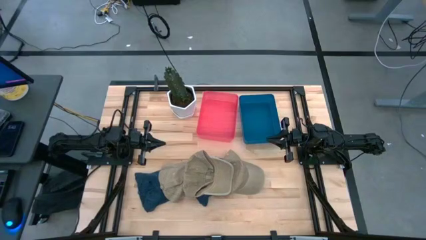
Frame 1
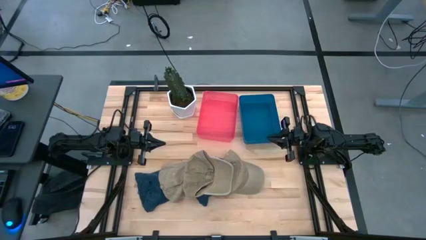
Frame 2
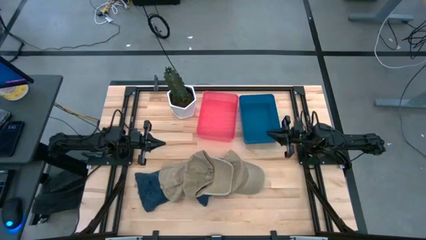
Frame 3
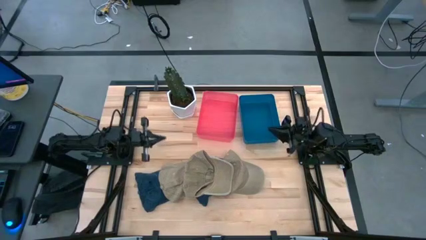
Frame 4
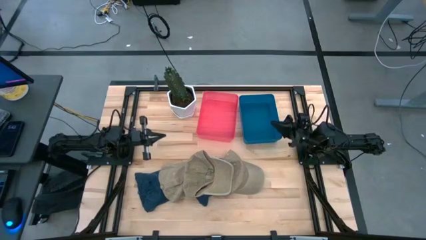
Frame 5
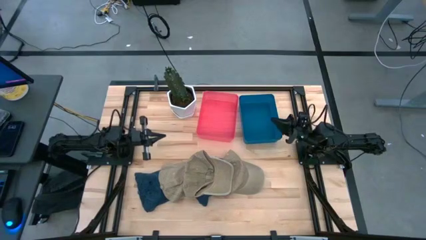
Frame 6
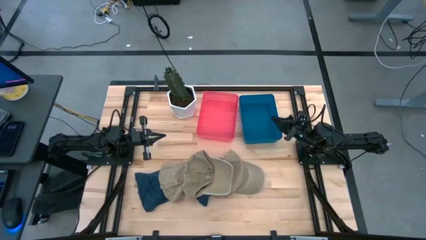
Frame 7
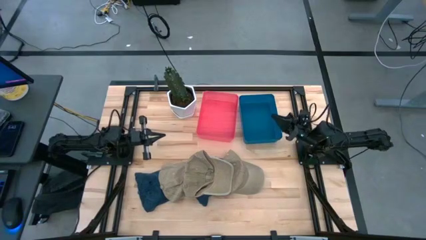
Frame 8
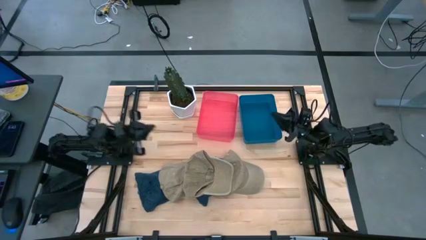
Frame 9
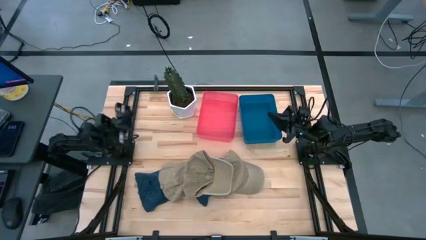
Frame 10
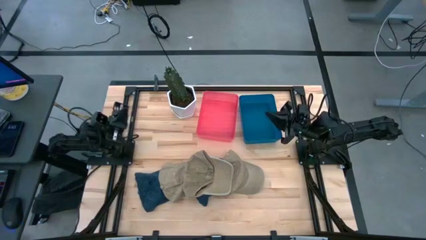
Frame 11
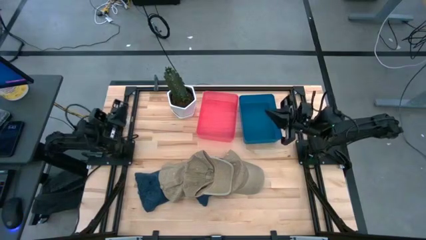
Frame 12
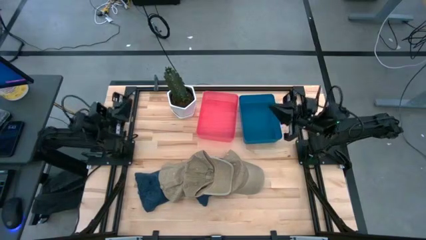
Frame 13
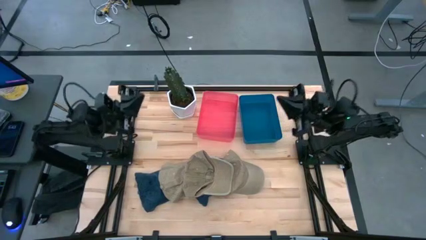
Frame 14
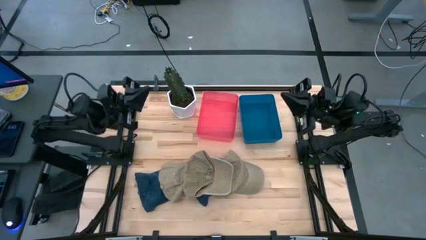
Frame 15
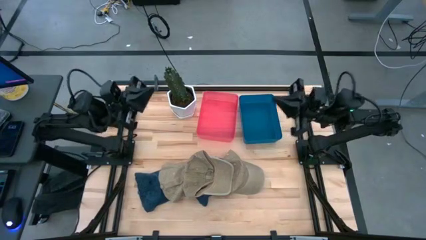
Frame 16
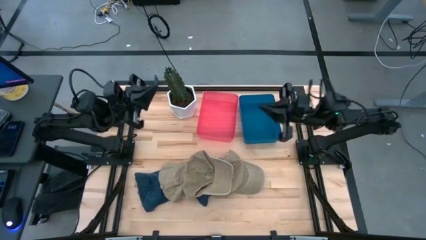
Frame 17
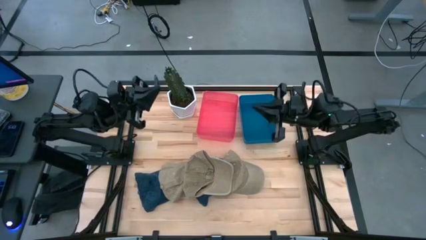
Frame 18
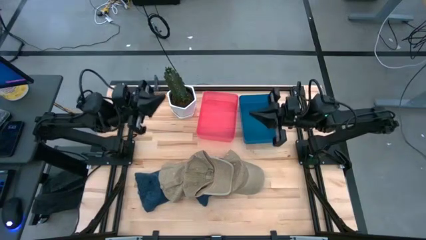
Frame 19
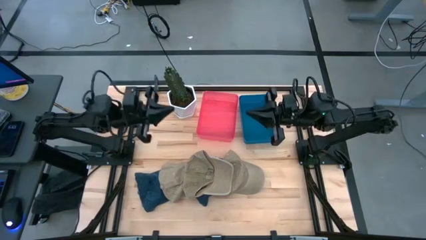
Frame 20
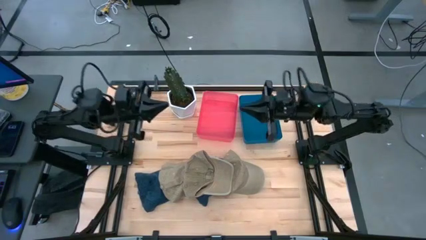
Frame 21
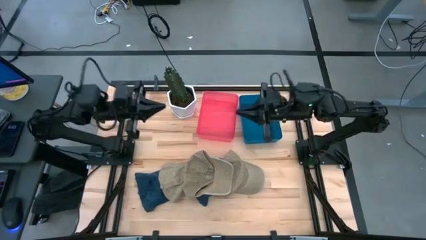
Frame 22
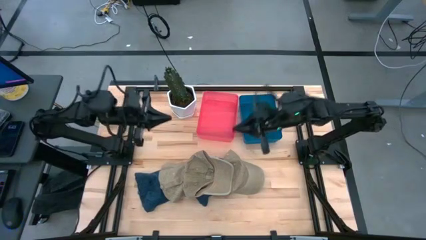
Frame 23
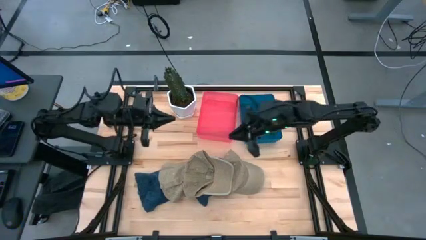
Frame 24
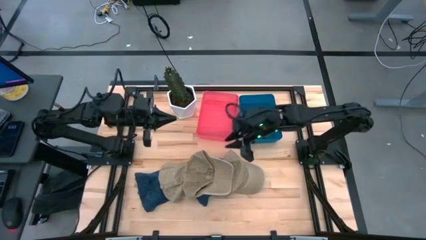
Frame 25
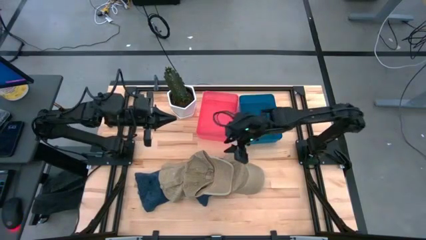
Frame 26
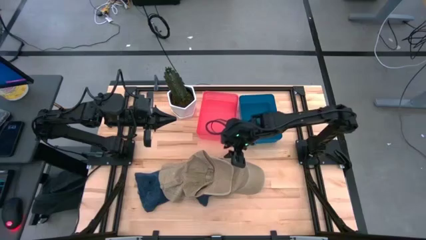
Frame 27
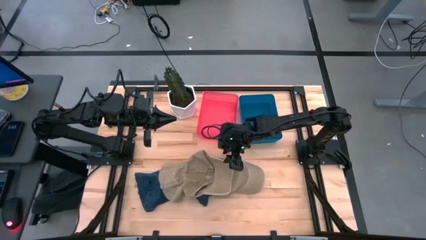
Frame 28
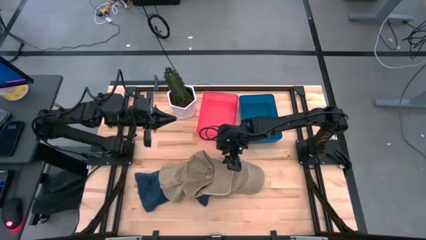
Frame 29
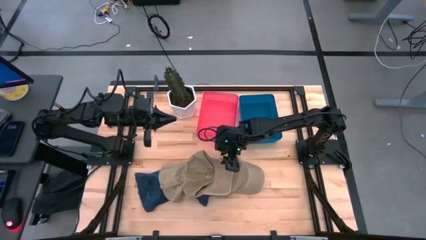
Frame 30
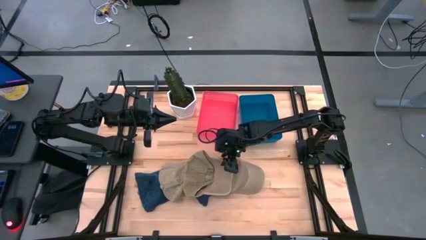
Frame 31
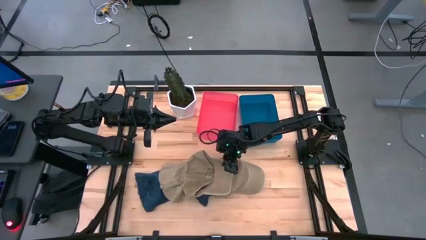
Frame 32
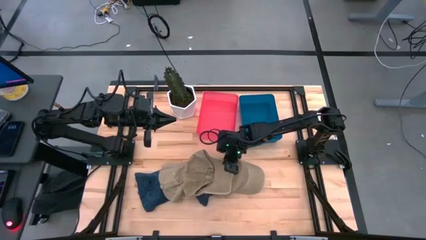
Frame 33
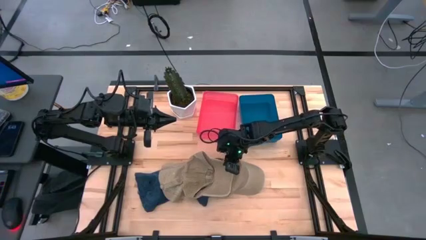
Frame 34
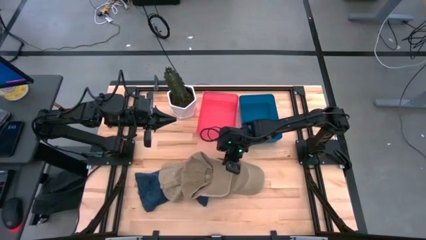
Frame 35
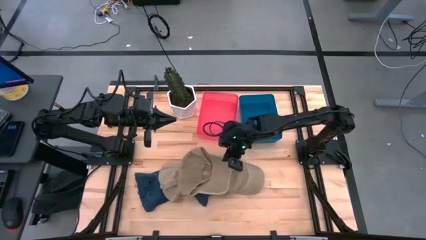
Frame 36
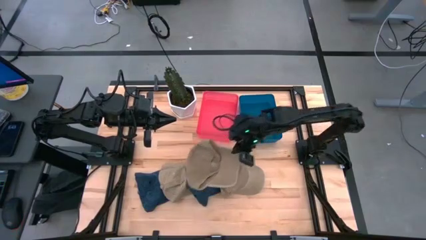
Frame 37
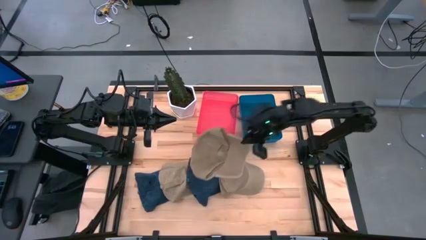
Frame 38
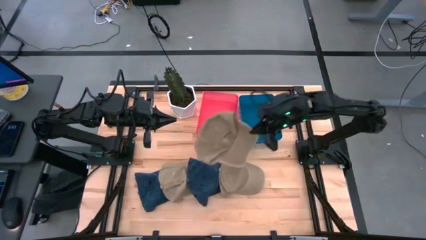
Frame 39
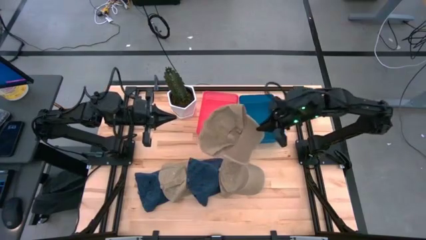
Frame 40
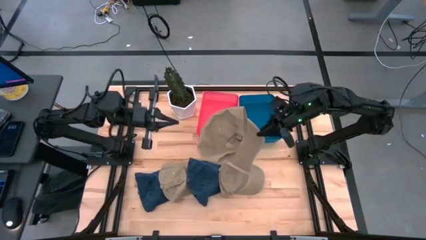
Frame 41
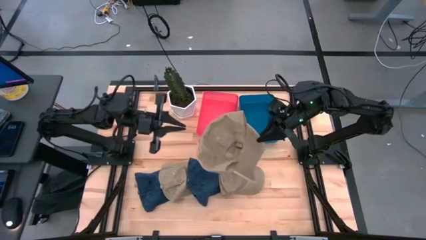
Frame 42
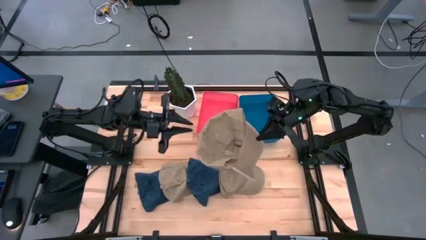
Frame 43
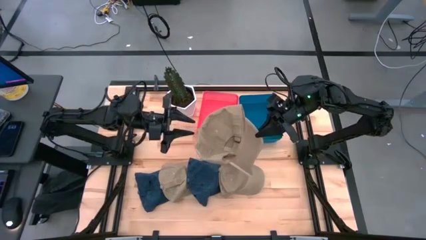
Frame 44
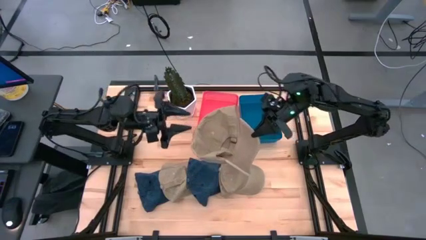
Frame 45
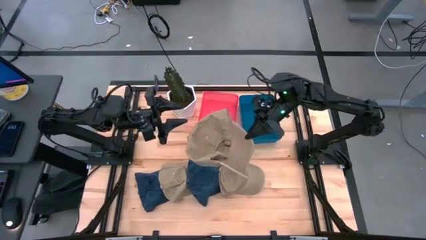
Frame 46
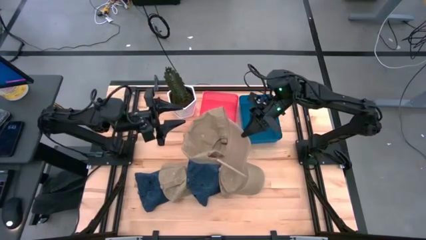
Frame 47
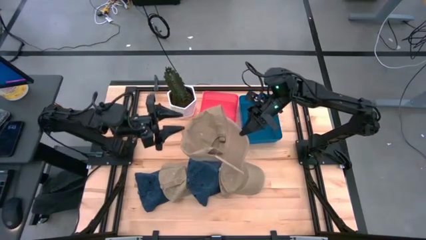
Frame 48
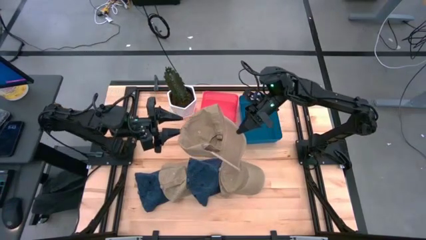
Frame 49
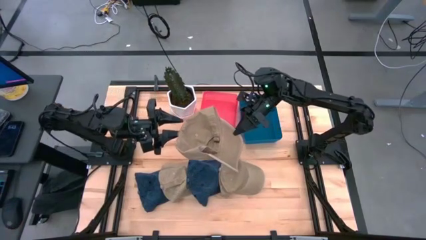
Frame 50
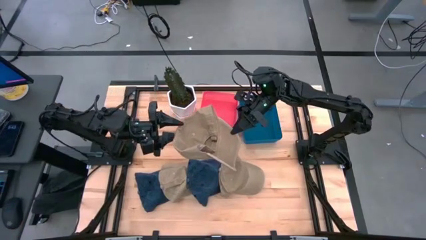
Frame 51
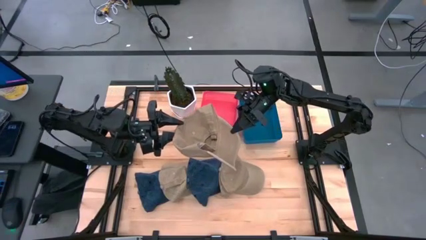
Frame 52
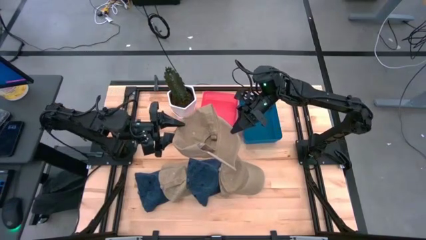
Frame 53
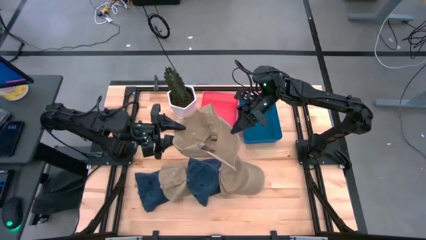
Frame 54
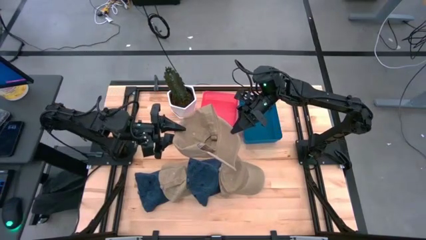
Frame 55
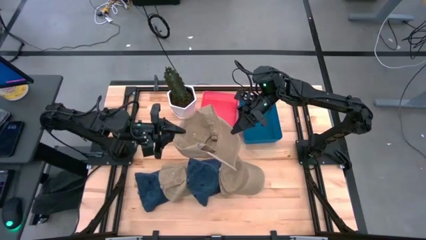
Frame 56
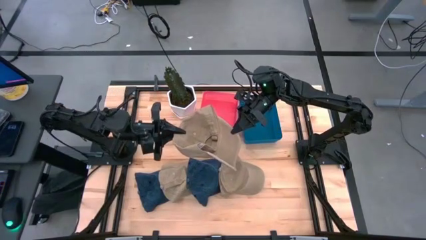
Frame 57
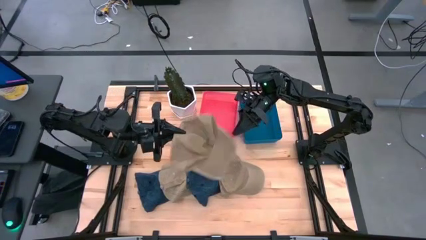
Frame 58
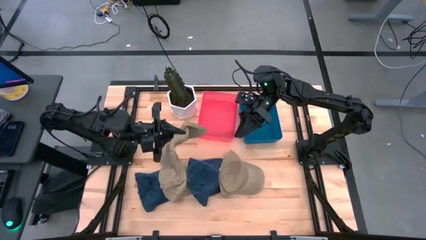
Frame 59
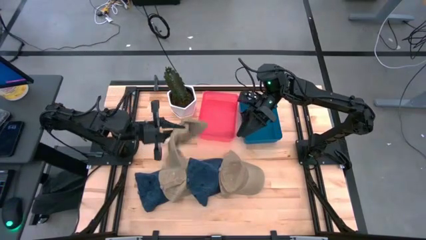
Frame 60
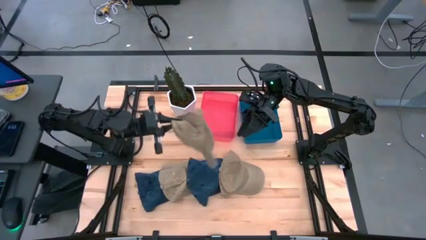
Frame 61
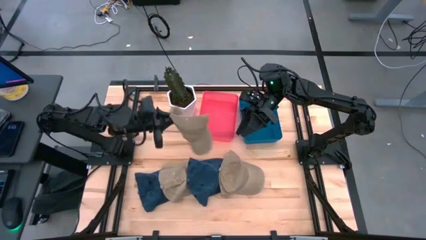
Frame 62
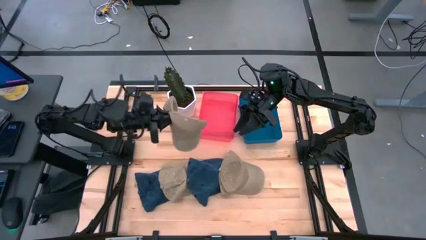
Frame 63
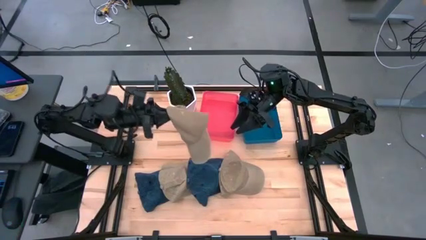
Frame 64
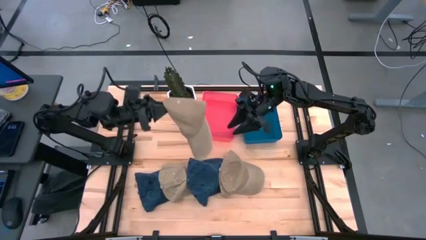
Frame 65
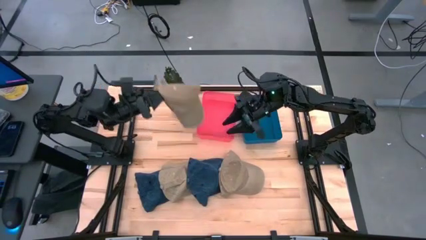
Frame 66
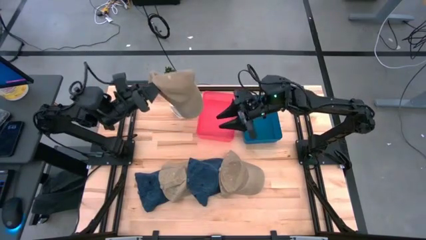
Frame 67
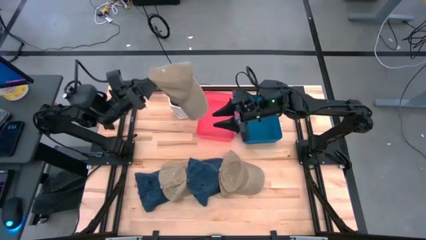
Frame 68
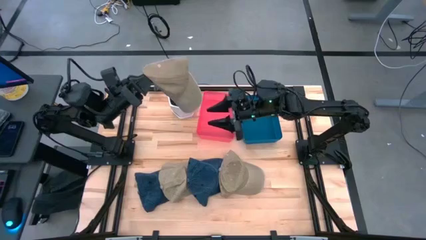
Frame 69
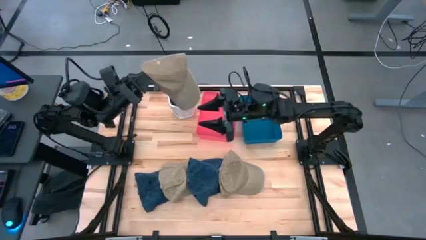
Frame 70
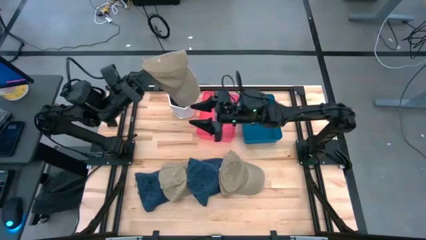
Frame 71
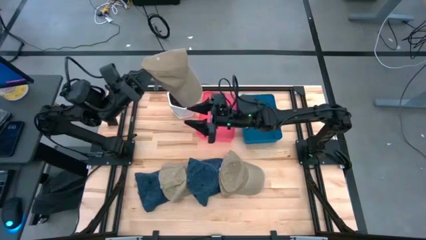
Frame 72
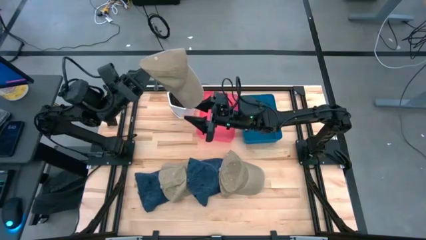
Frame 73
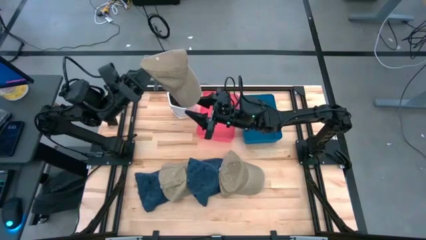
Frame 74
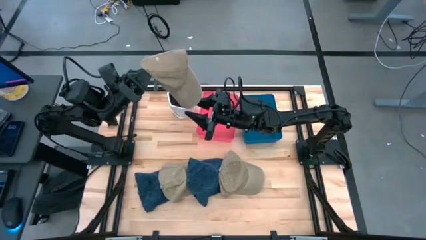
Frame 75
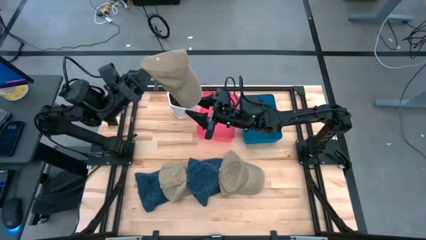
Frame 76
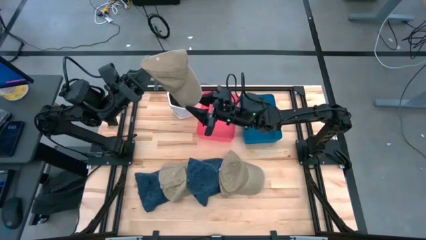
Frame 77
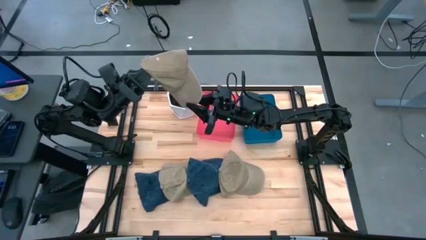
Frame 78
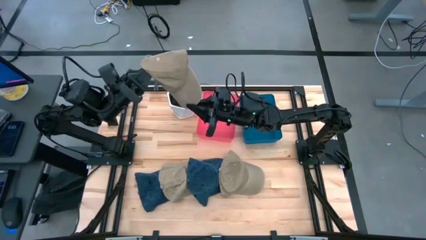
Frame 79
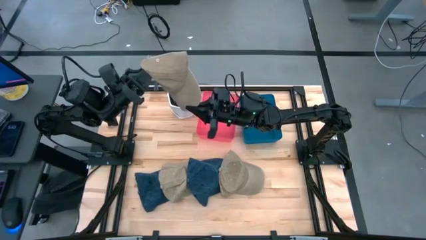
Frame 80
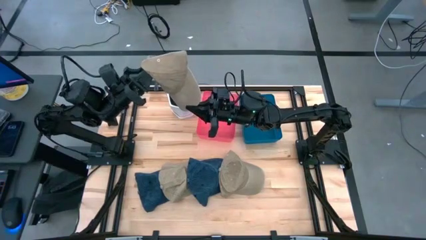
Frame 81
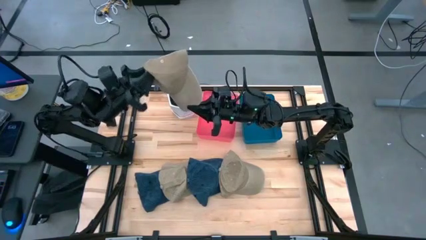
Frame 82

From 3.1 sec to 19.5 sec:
Task: Pick & Place hat
Put the middle brown cap into the blue bin
